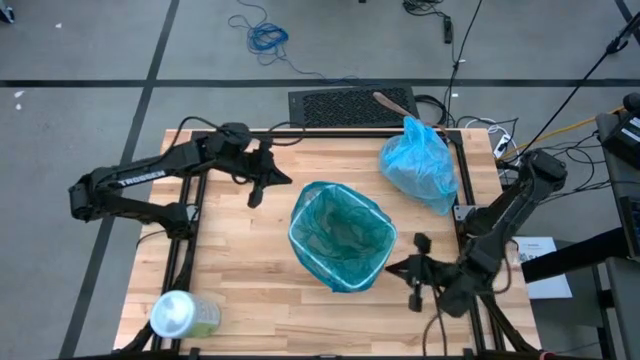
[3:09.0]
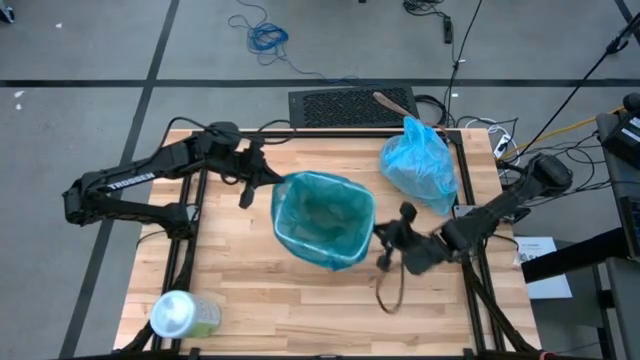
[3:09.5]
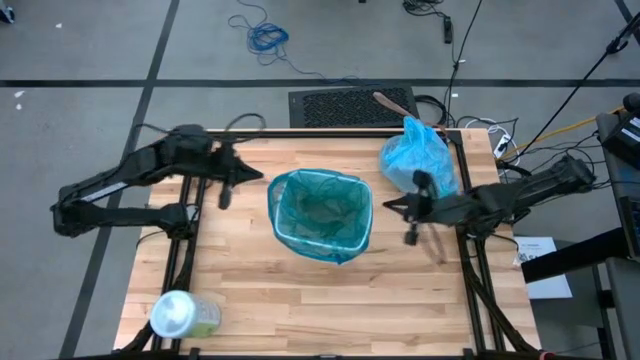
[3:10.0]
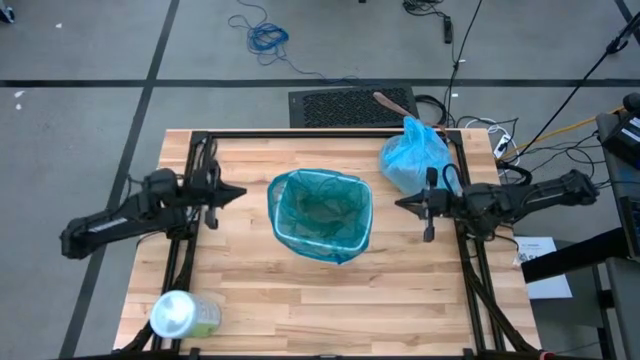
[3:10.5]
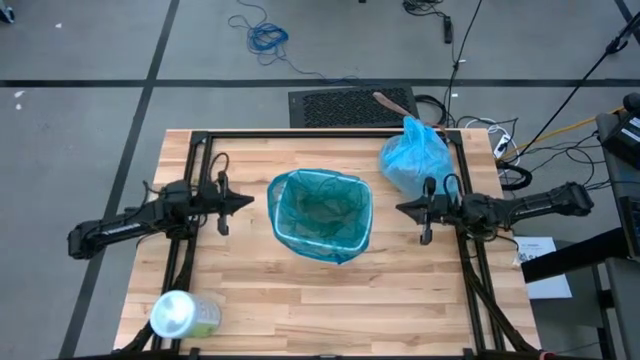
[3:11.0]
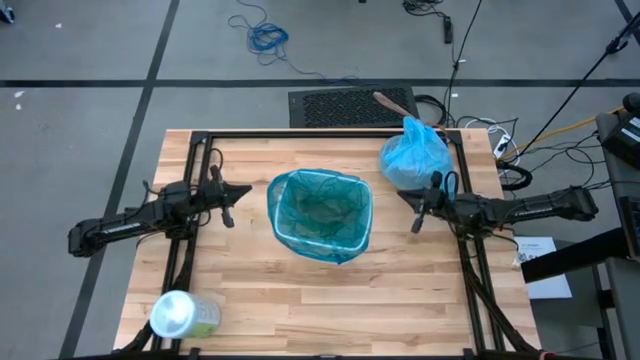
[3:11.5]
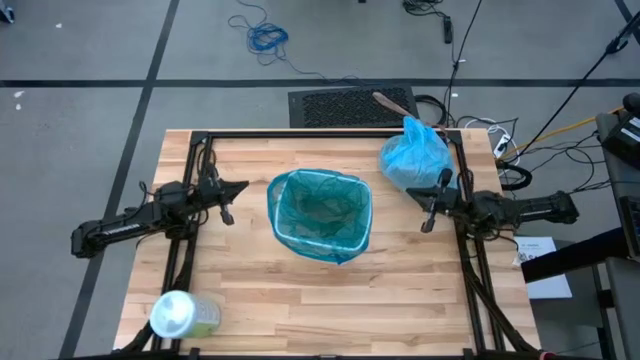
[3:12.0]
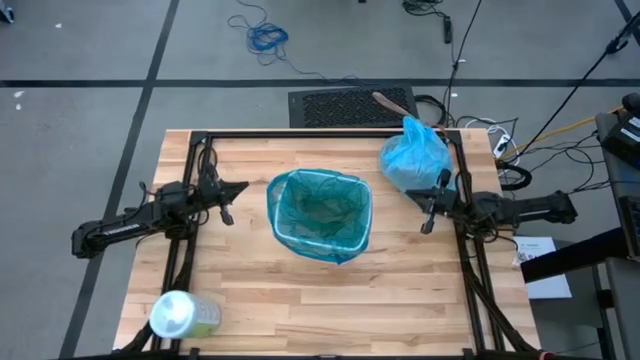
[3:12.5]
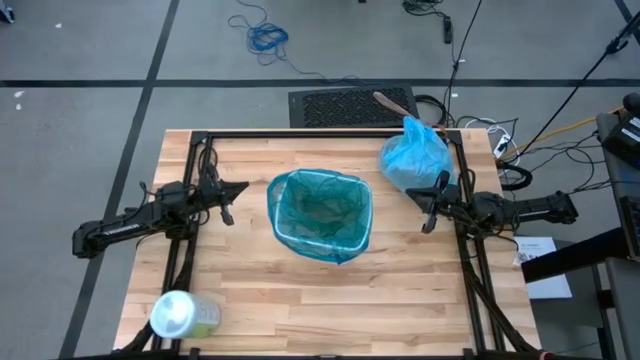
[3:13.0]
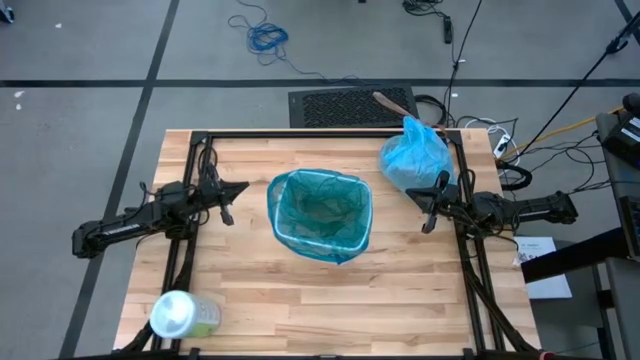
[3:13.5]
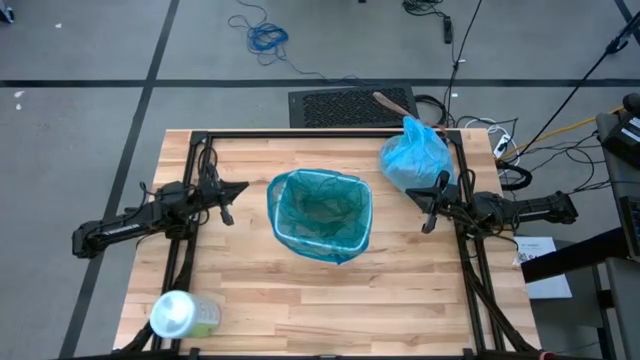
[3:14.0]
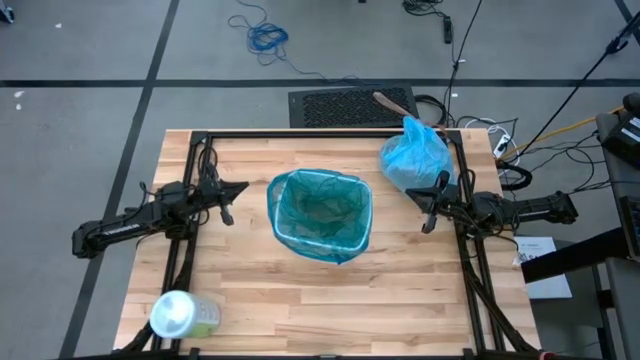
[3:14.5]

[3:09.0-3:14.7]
Task: place trash/remove bag and relplace
Return to Home Position

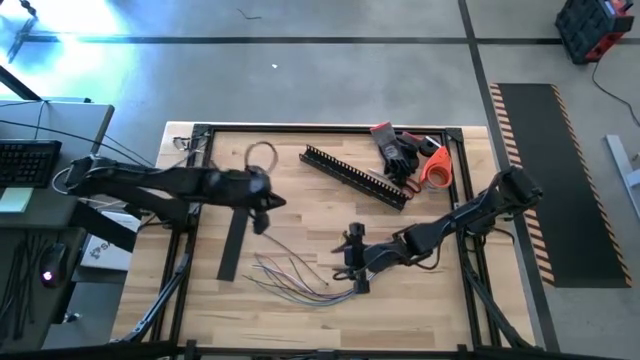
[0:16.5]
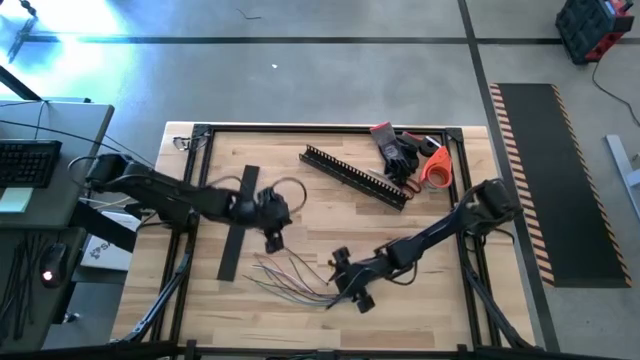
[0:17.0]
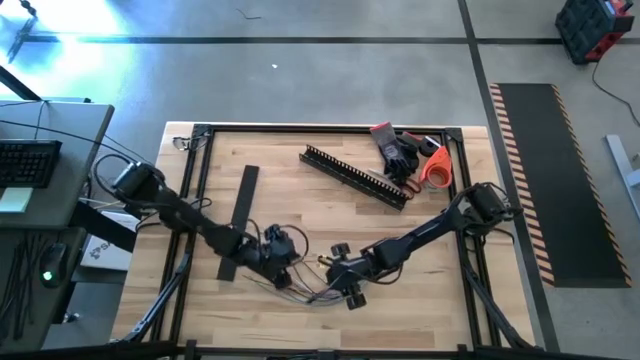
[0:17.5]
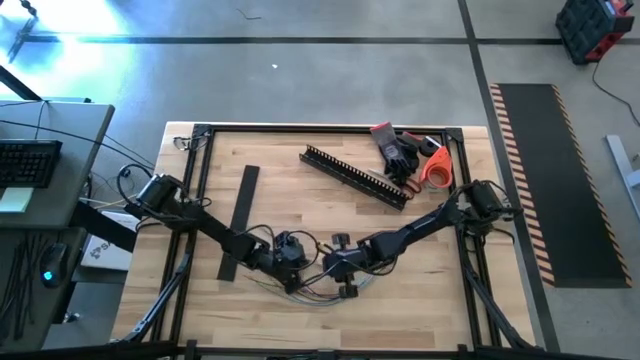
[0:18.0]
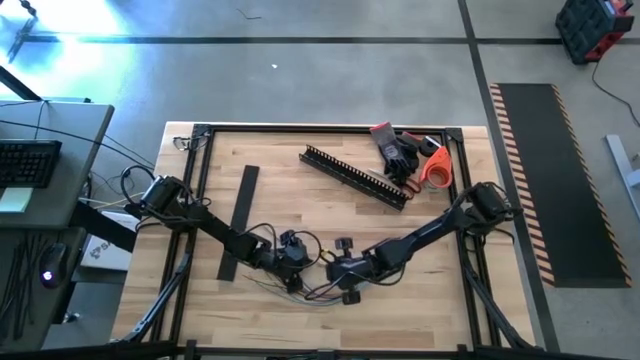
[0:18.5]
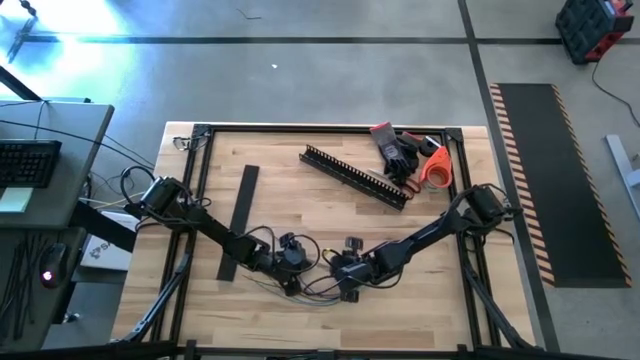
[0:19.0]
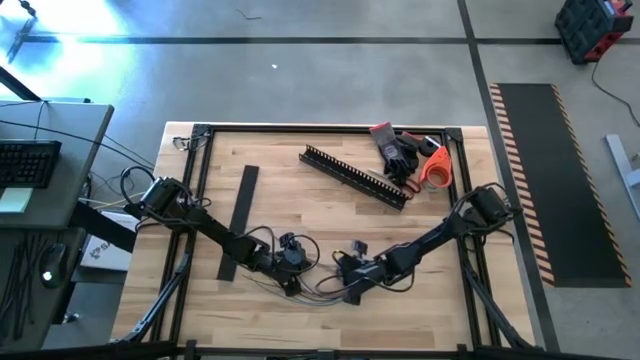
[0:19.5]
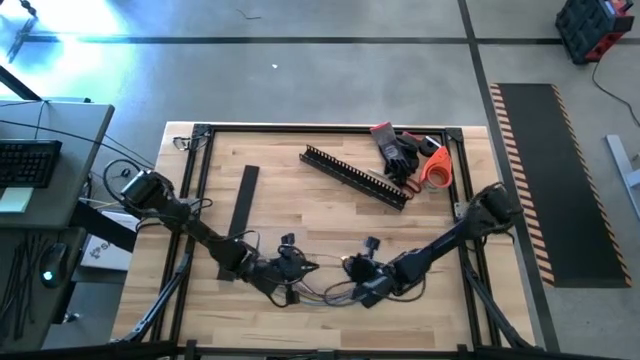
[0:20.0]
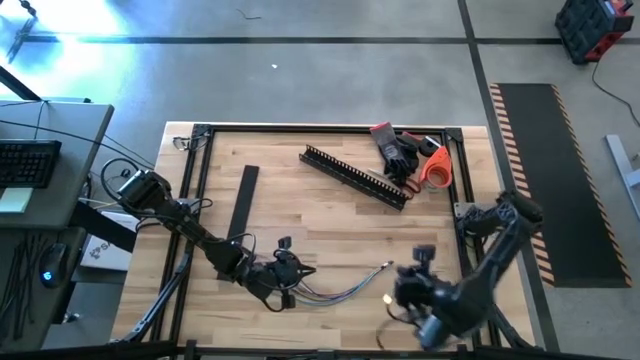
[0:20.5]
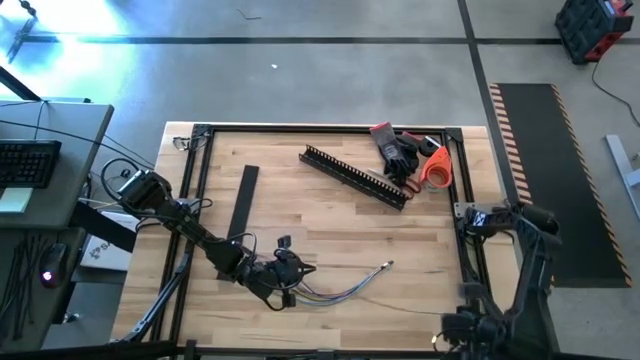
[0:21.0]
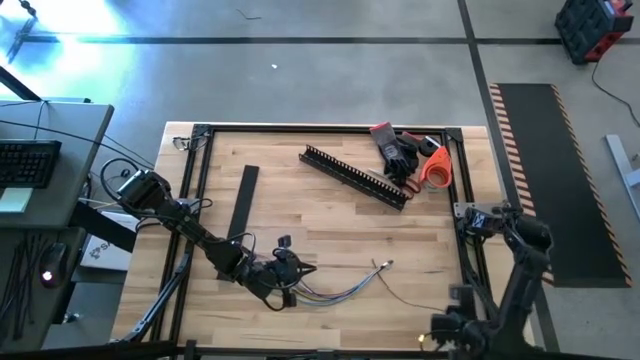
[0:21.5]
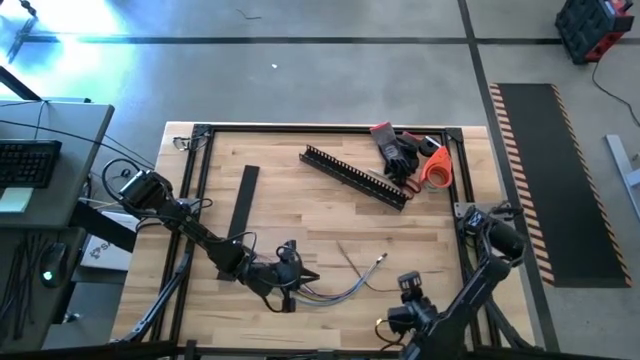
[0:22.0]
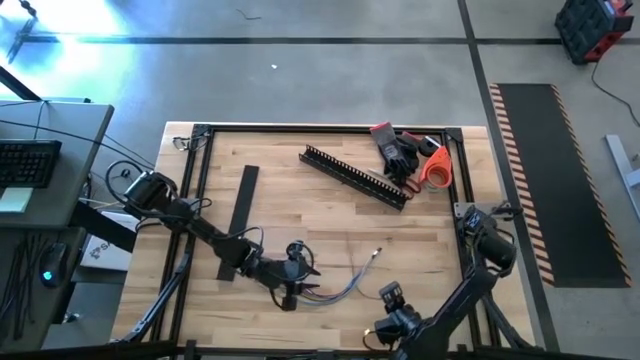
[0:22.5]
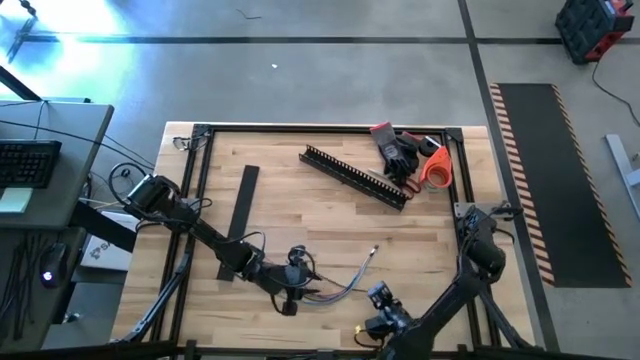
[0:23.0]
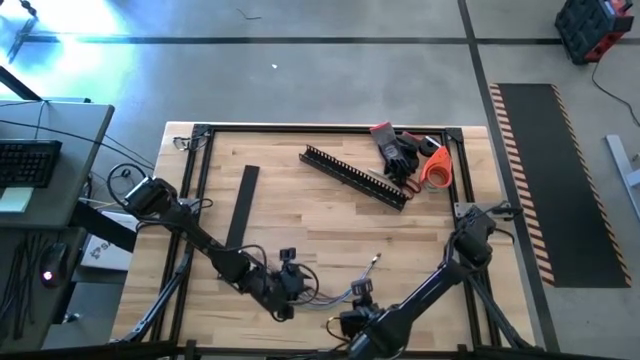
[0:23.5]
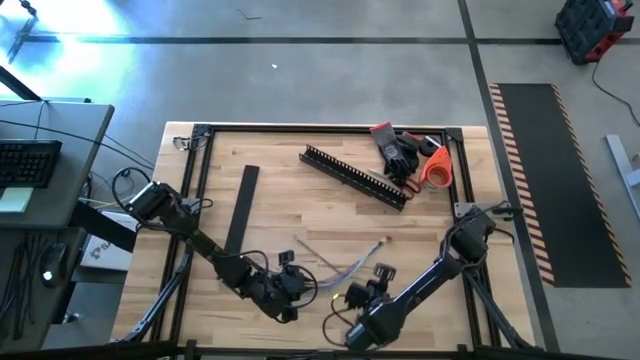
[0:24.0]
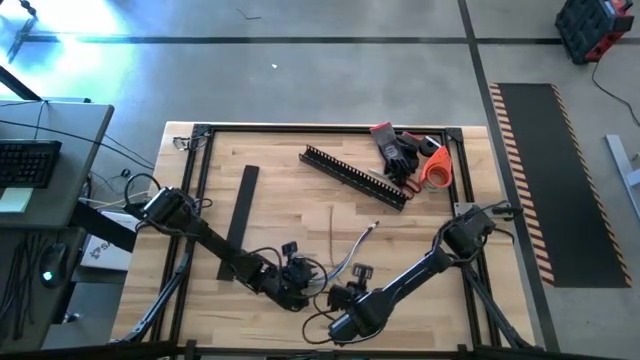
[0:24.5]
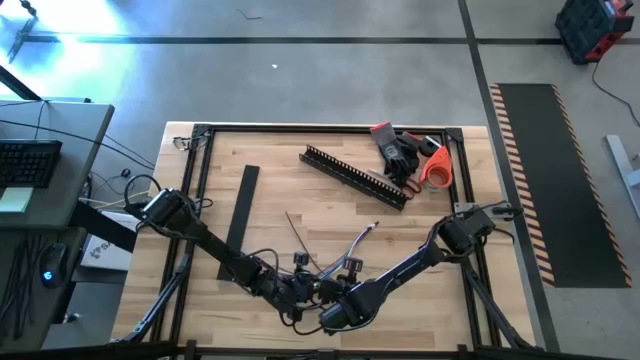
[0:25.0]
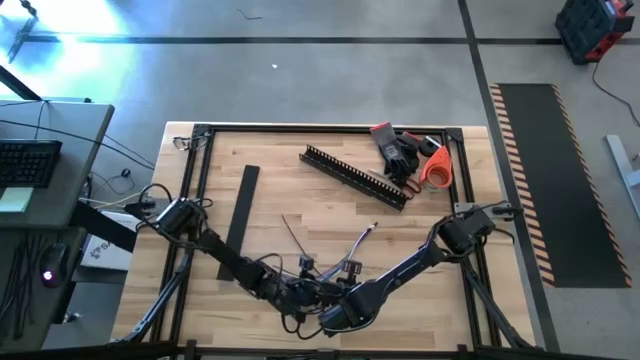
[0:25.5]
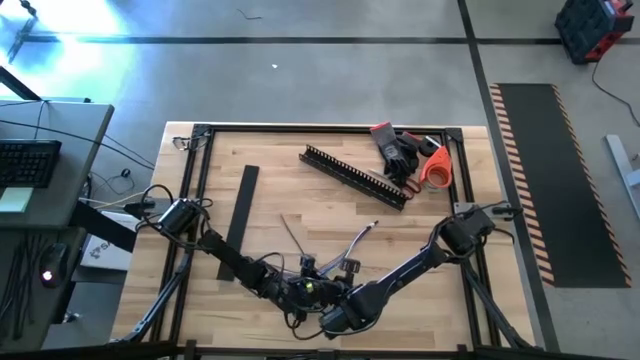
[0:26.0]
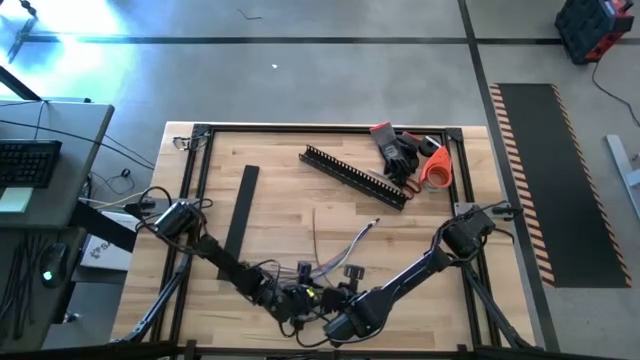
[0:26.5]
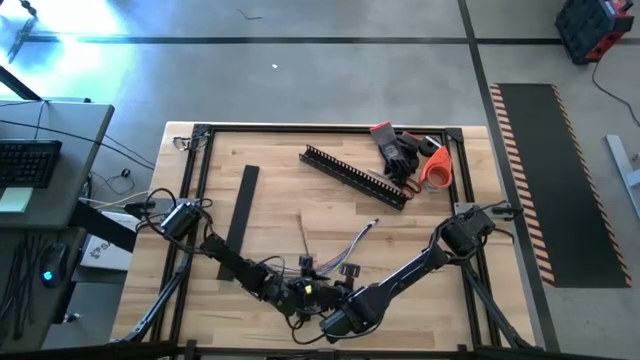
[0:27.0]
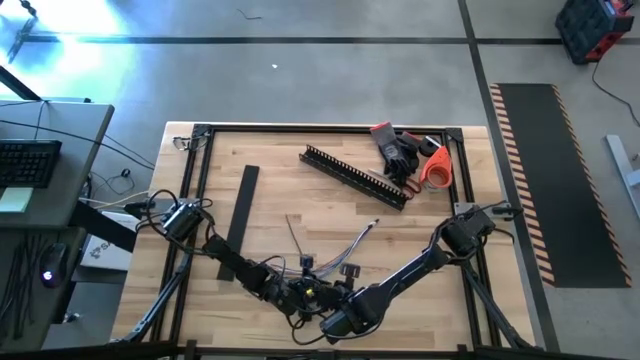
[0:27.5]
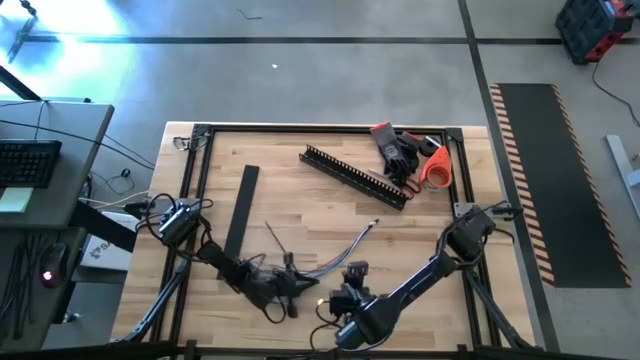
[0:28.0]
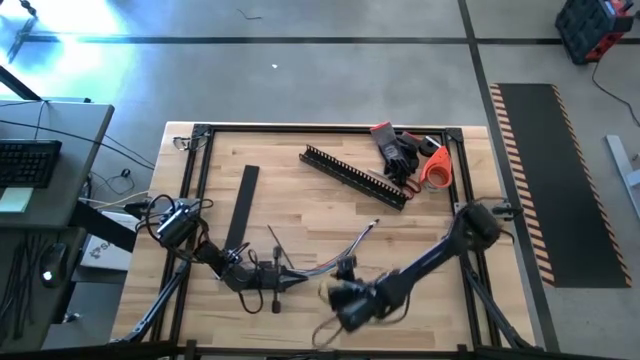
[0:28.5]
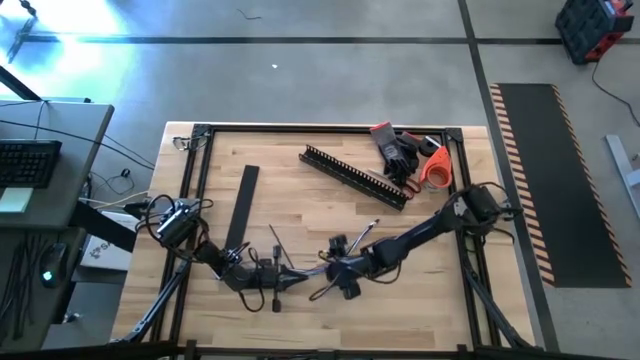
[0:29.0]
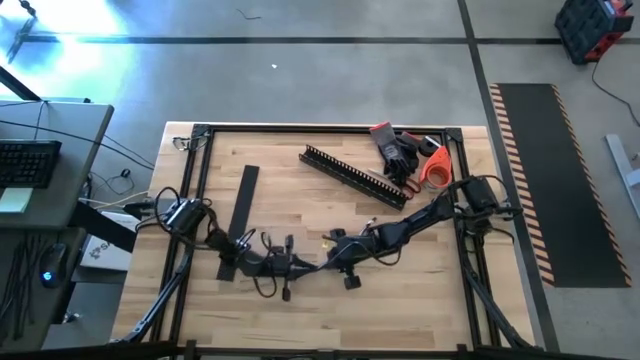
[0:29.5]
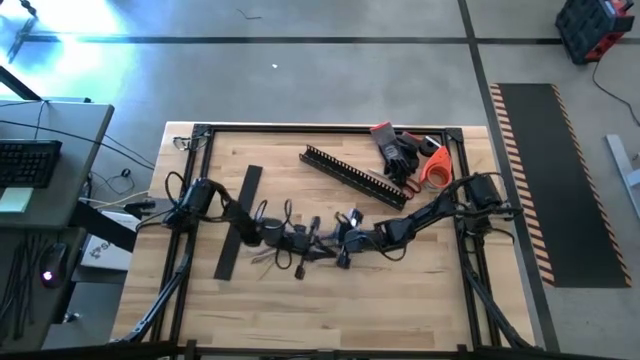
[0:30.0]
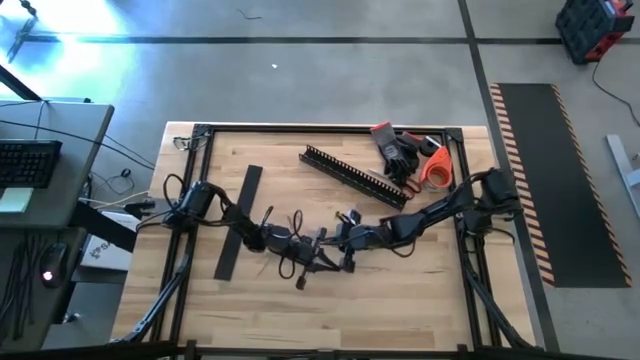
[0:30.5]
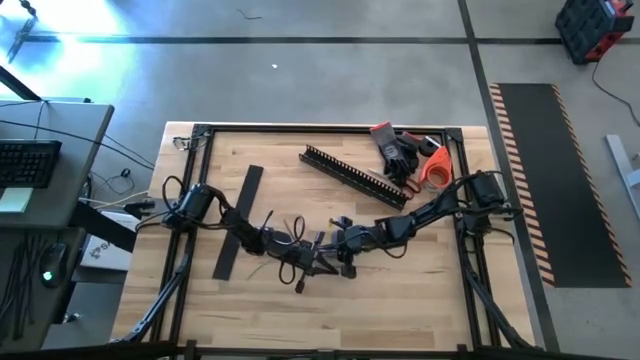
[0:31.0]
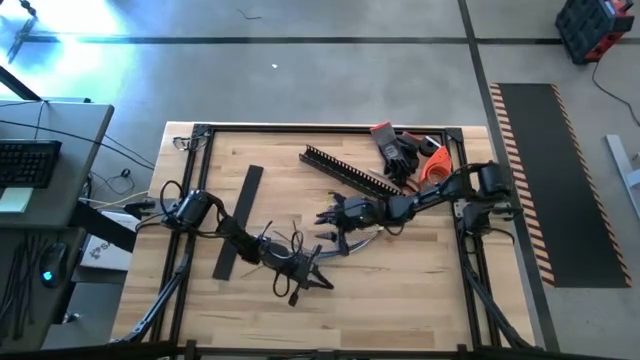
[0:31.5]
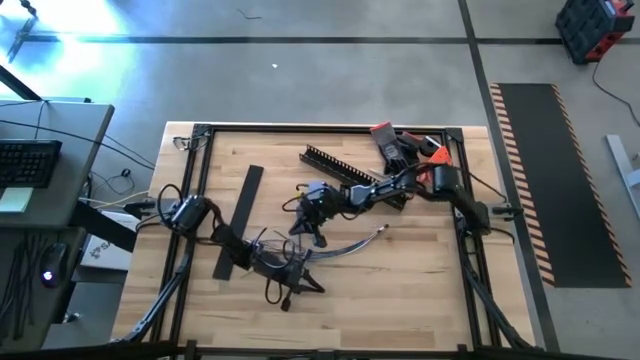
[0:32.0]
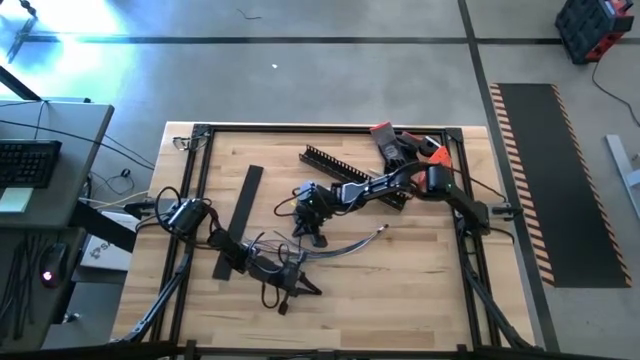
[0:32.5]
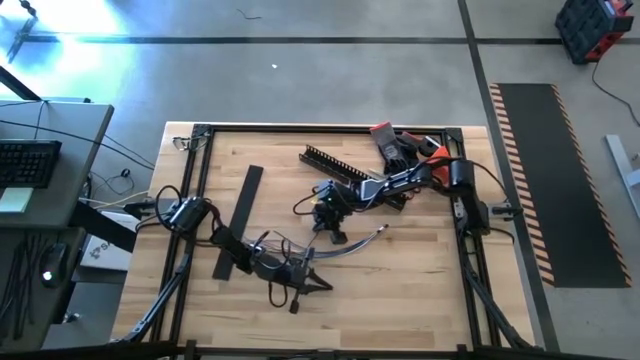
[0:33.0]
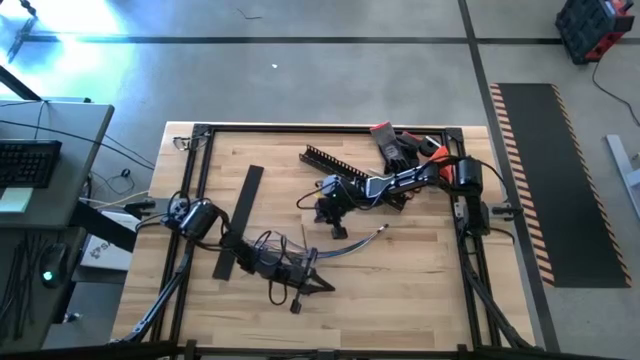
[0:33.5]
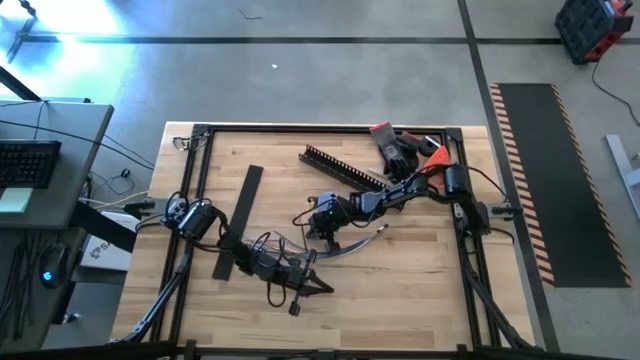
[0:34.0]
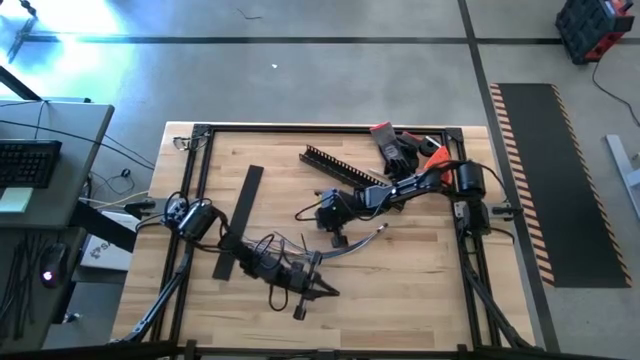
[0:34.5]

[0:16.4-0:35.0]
Task: Ziptie cables
Wrap the black zip tie on the cables
